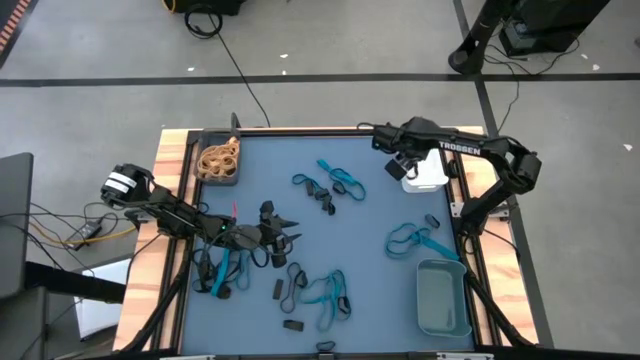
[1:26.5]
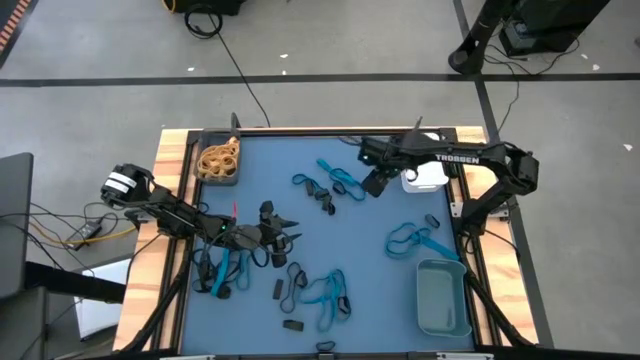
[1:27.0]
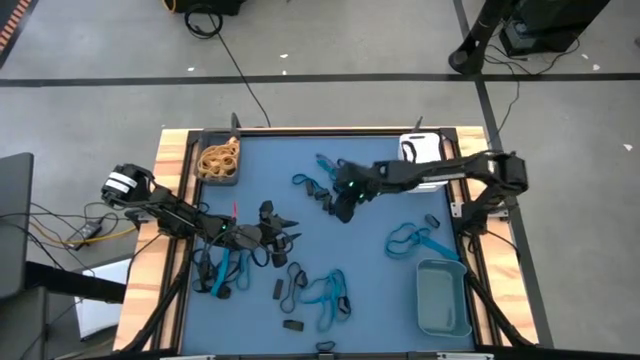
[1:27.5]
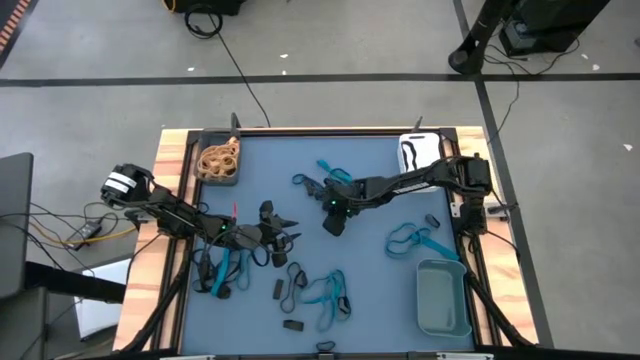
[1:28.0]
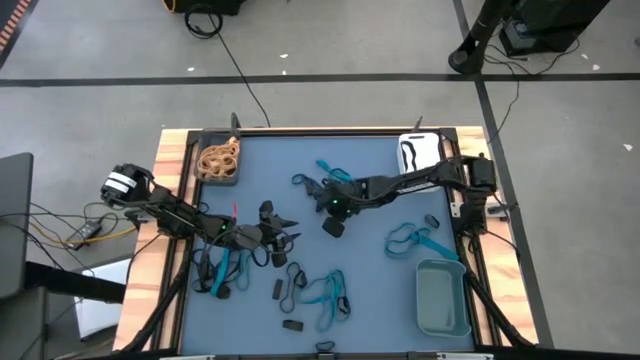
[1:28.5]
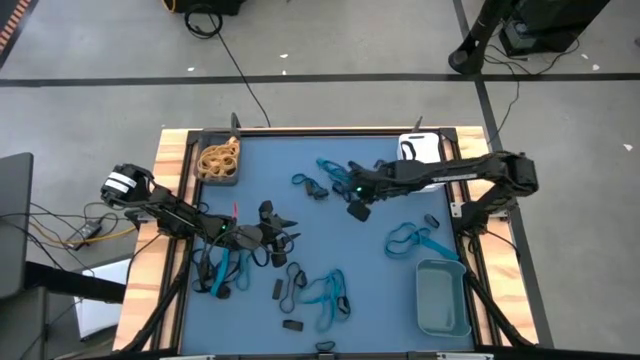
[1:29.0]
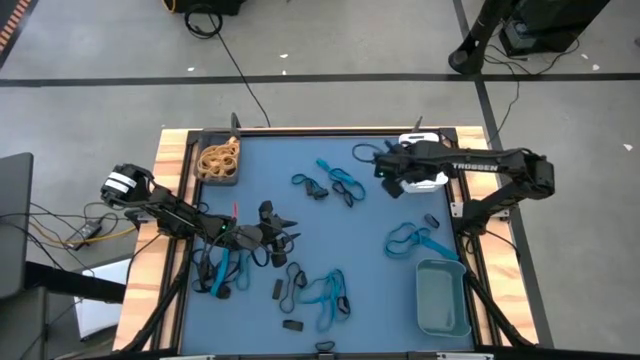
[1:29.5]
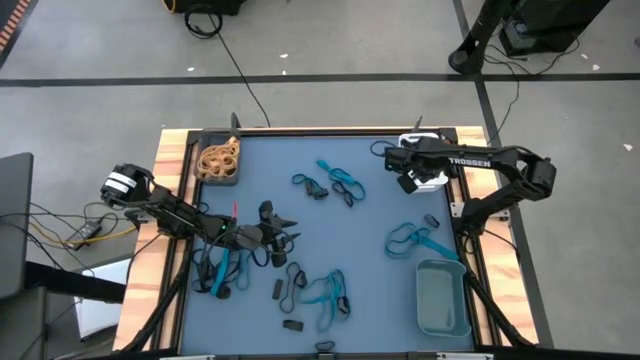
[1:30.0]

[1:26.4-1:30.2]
Task: Sort rubber bands into baskets
Put the black rubber band into the white bin

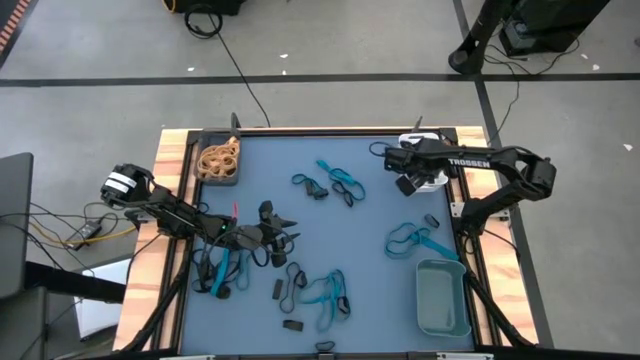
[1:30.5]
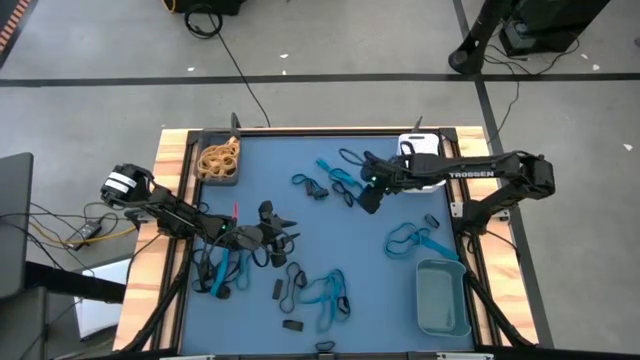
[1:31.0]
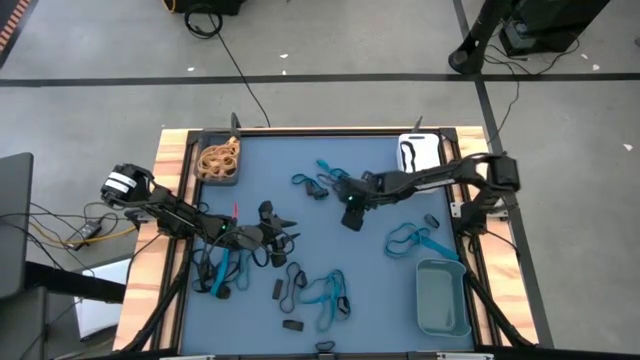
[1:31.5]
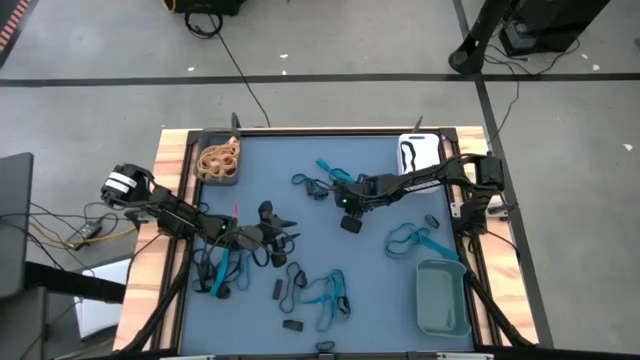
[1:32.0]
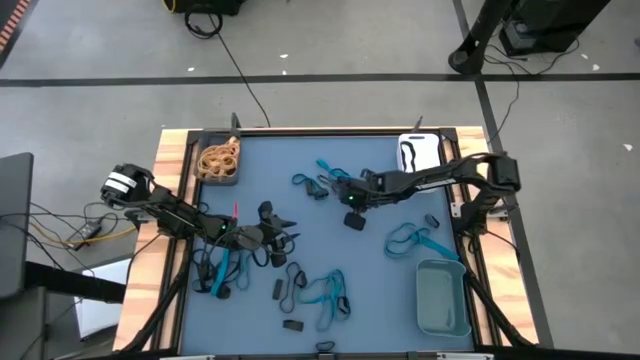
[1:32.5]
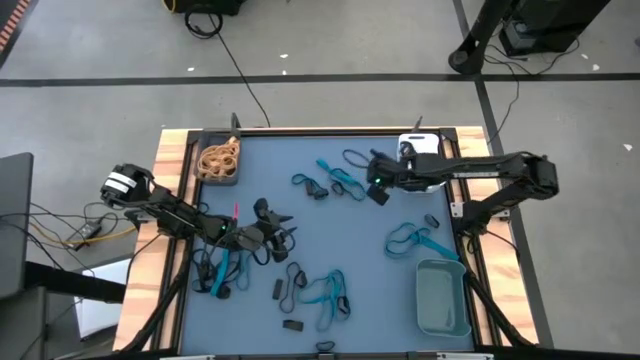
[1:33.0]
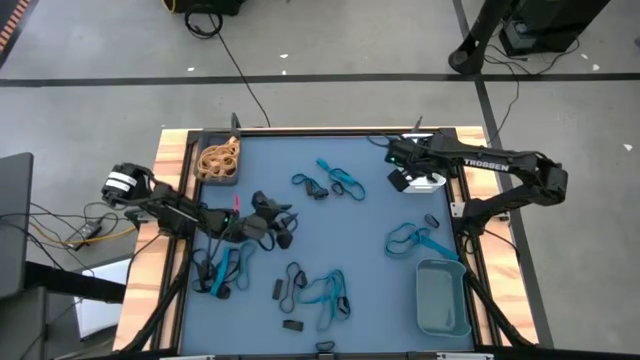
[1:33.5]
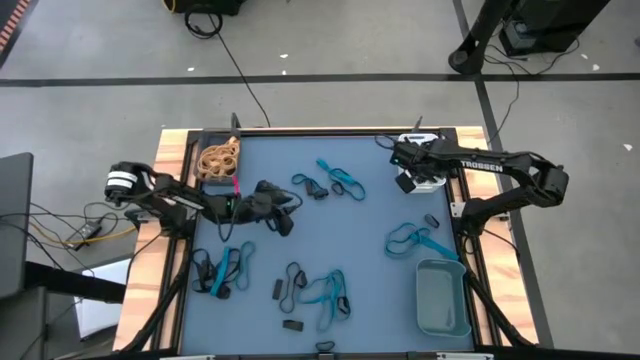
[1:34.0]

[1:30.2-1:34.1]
Put the black rubber band into the white bin

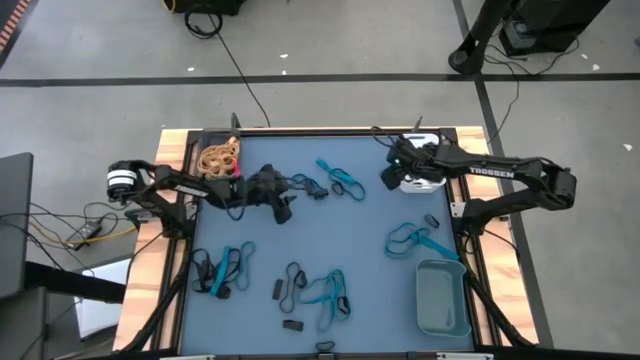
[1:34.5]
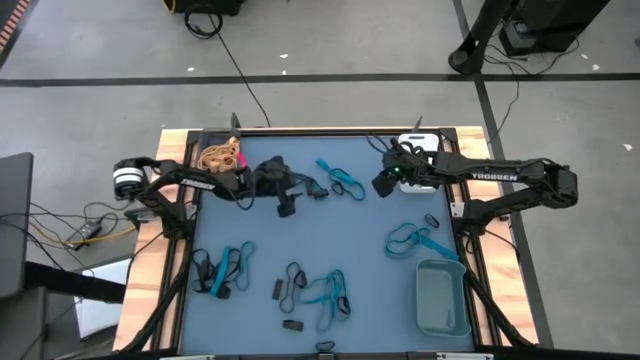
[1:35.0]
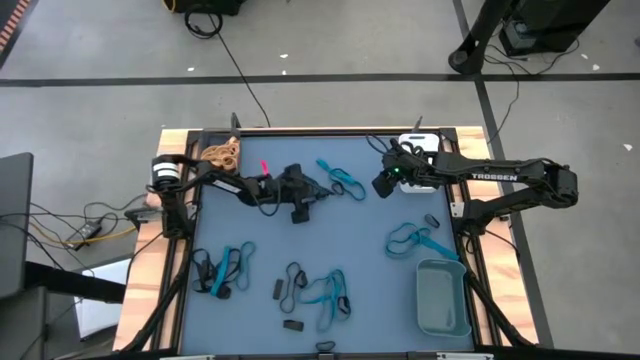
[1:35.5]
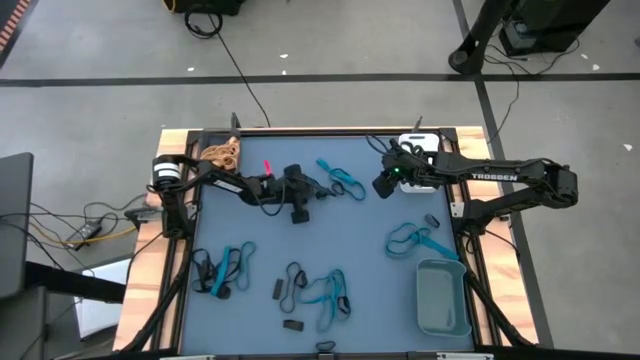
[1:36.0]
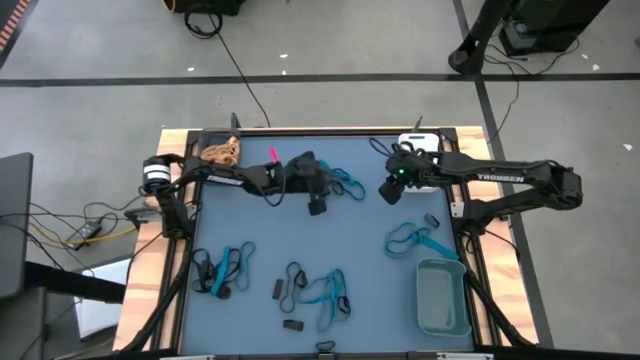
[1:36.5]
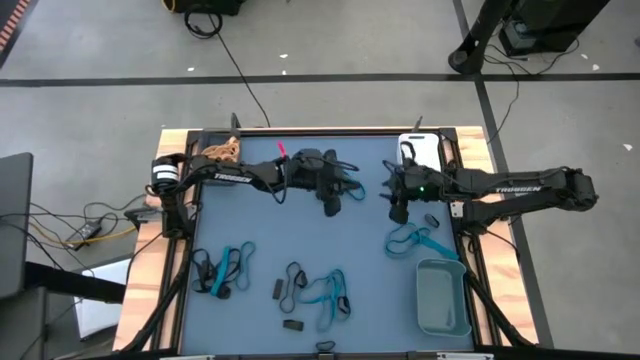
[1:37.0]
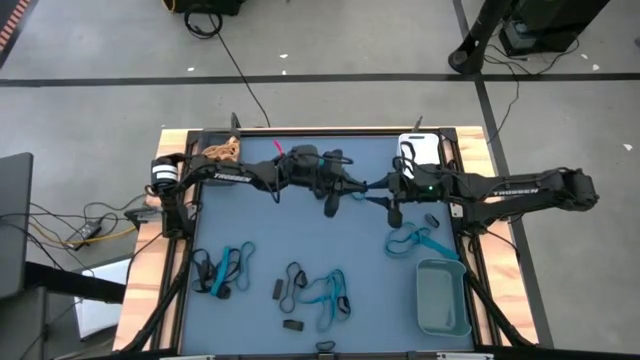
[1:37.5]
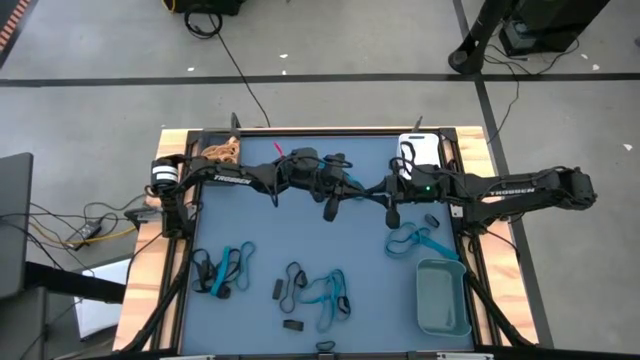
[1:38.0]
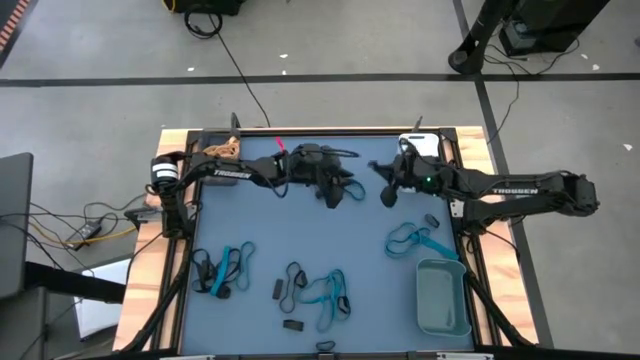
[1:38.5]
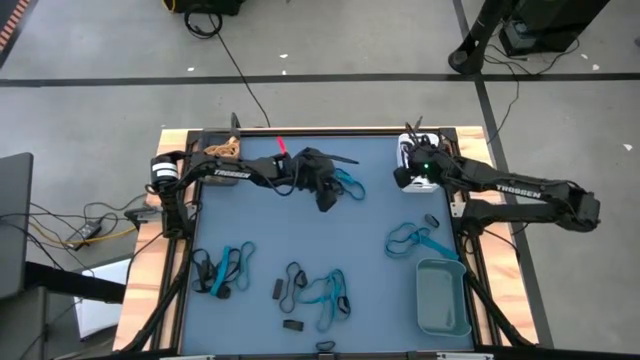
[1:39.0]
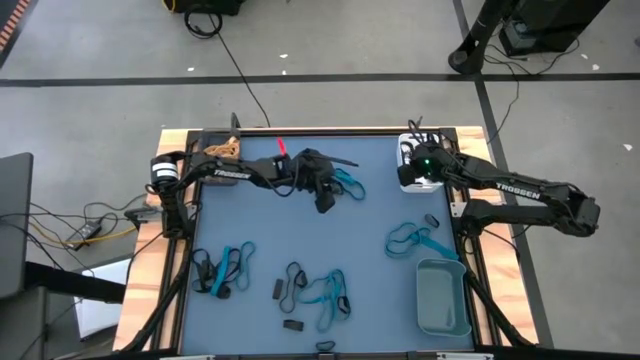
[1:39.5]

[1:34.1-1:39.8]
Put the black rubber band into the white bin

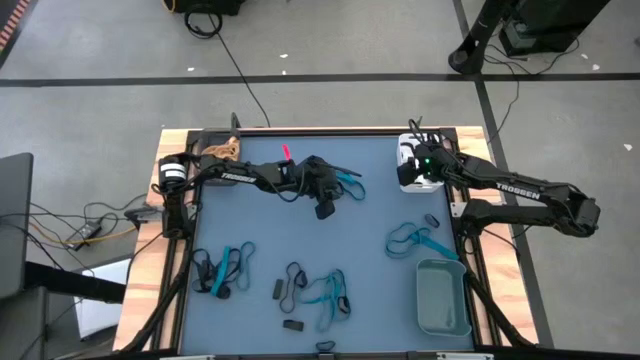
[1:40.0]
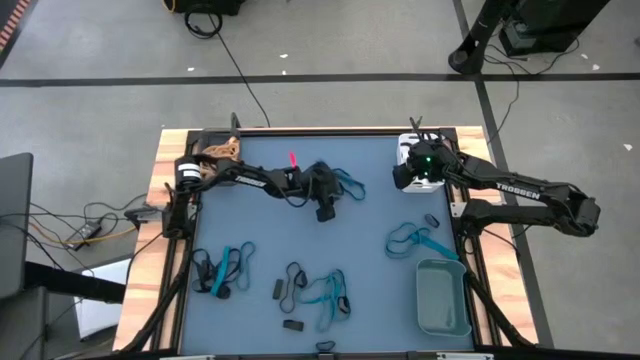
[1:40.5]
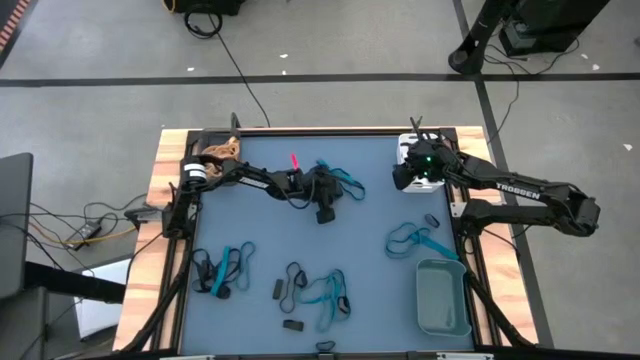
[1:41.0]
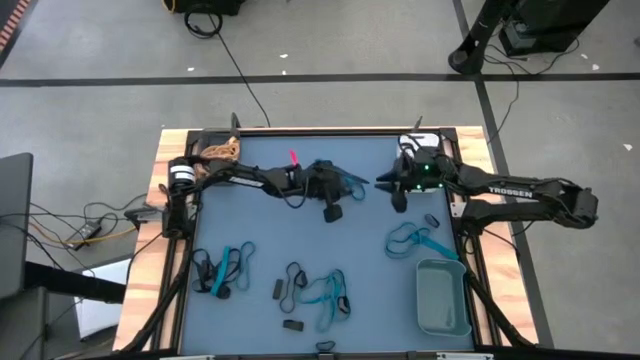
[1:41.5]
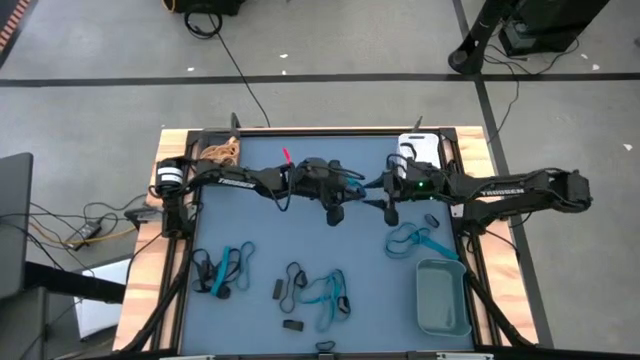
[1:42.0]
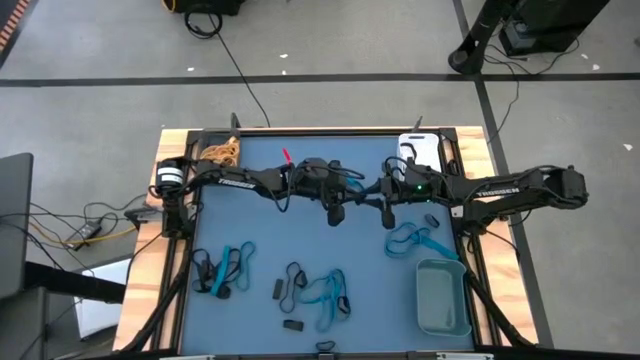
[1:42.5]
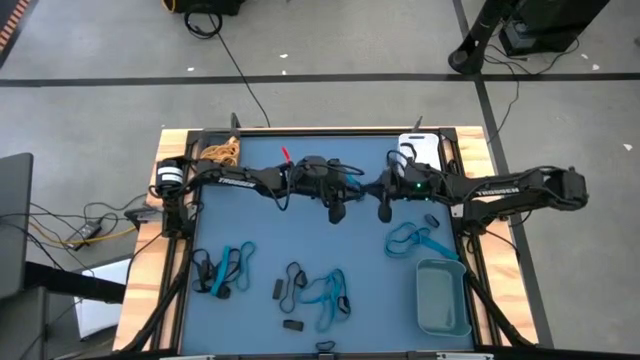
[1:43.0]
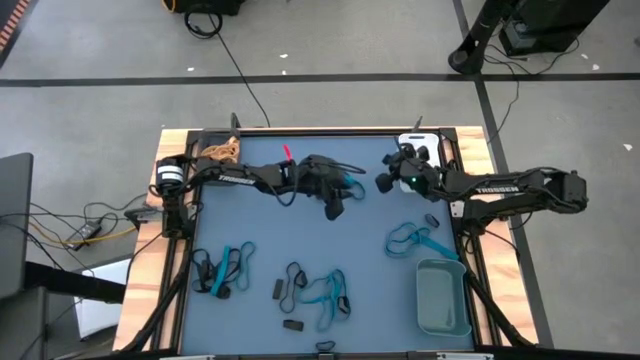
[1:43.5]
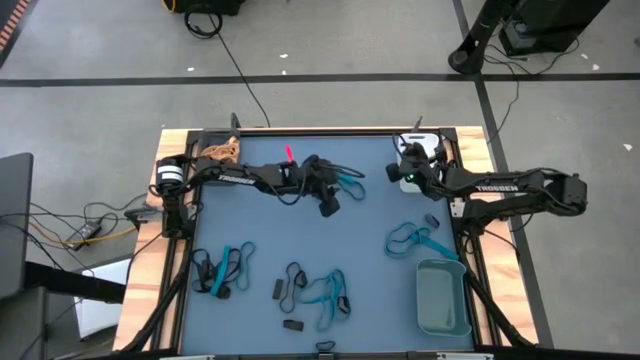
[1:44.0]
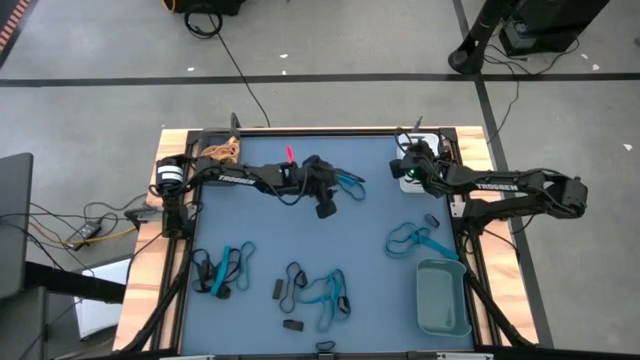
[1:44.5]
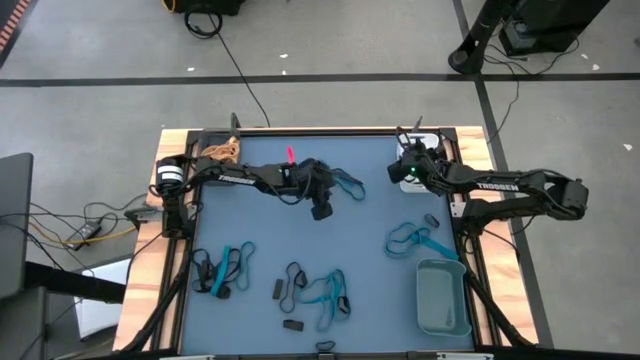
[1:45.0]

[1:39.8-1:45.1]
Put the black rubber band into the white bin

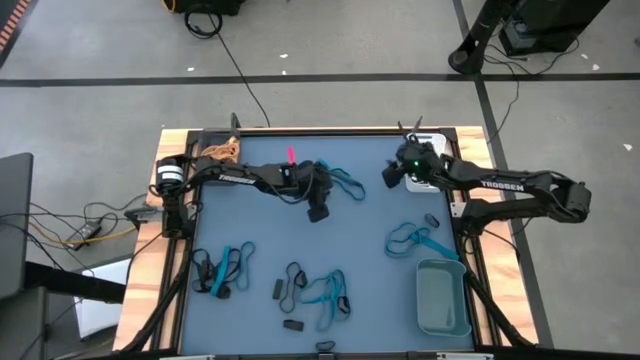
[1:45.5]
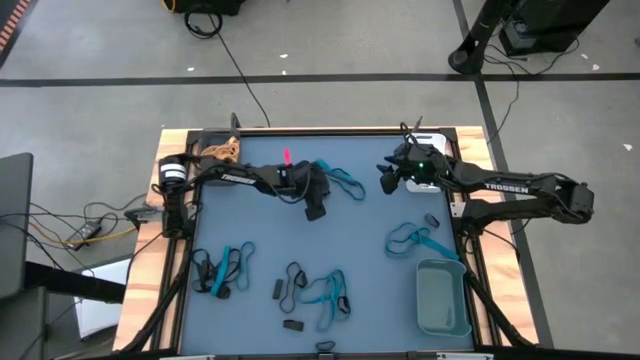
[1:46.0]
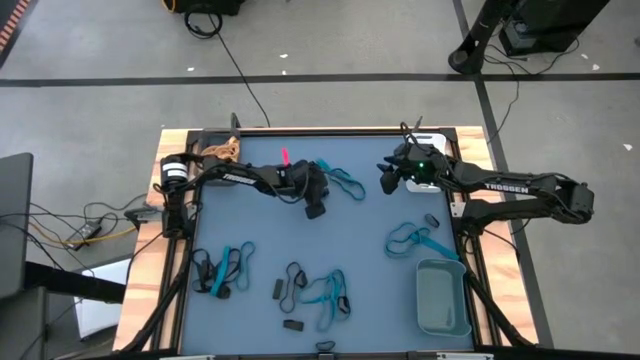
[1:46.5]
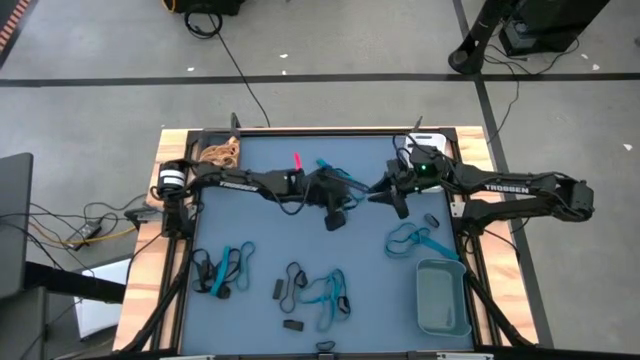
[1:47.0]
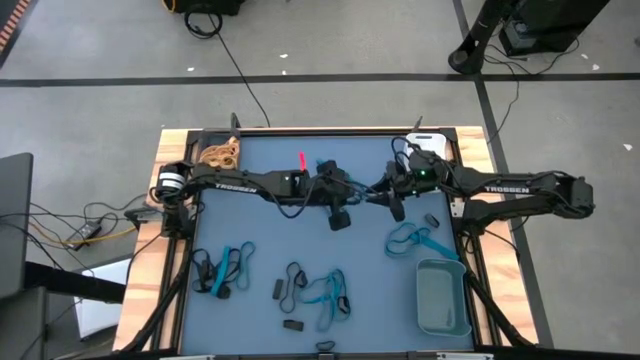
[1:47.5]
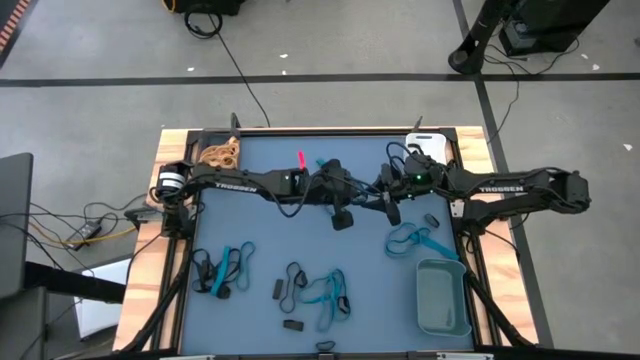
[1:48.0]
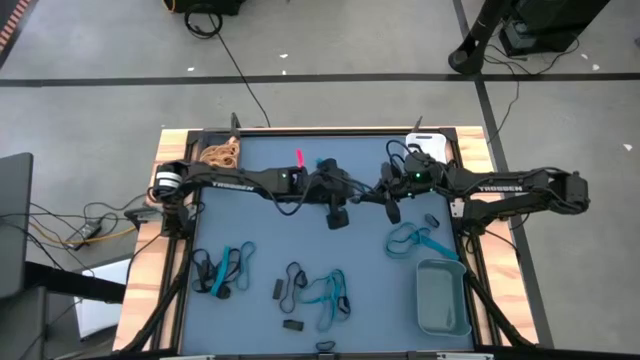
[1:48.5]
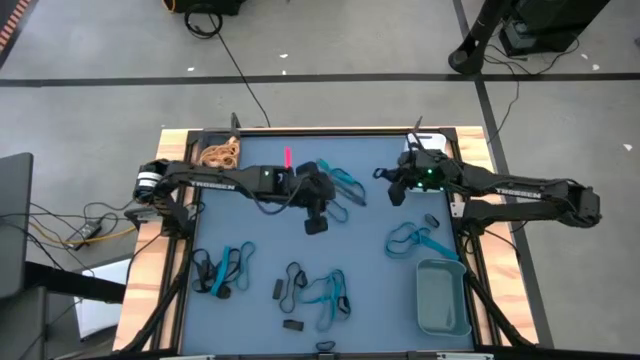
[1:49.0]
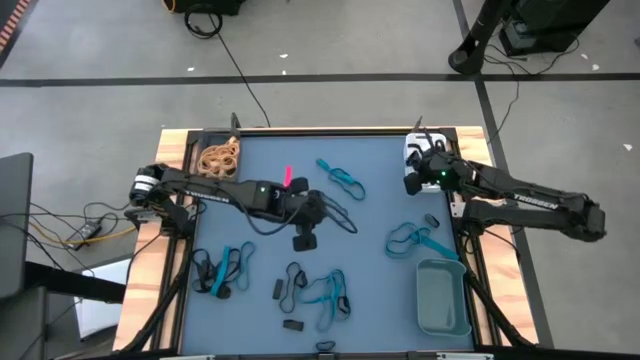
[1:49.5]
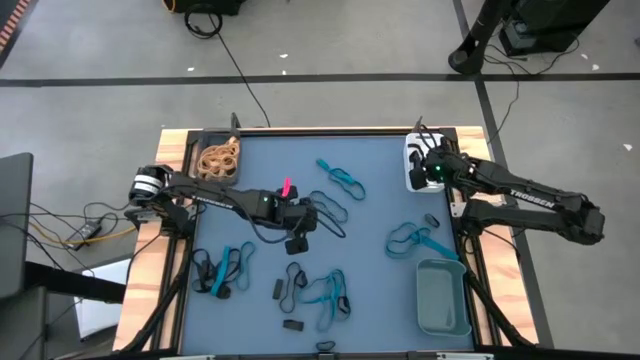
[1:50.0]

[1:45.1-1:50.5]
Put the black rubber band into the white bin
